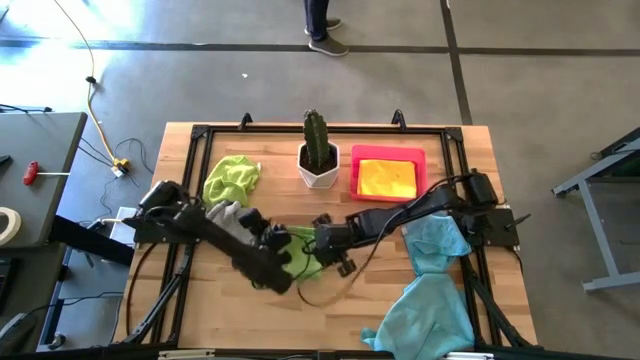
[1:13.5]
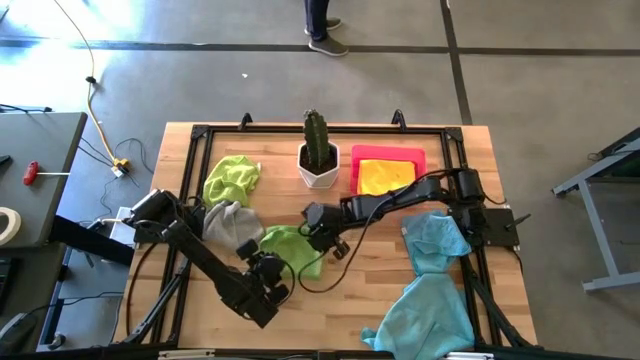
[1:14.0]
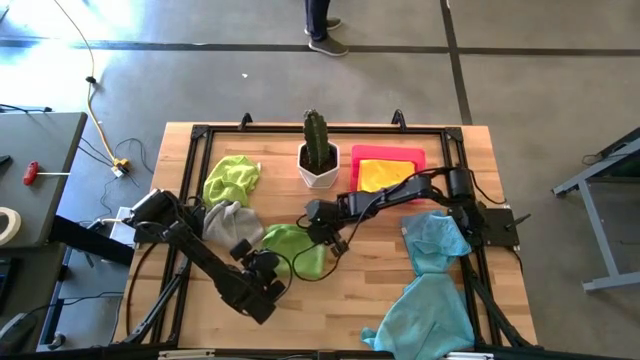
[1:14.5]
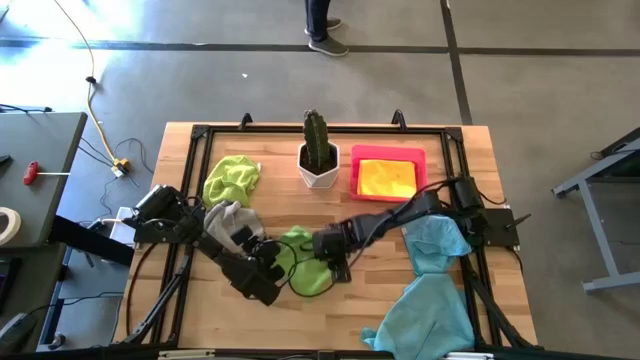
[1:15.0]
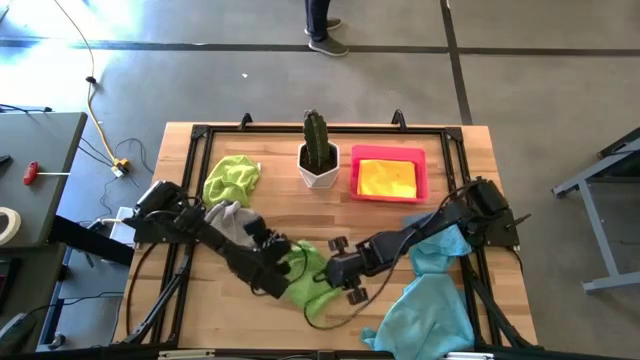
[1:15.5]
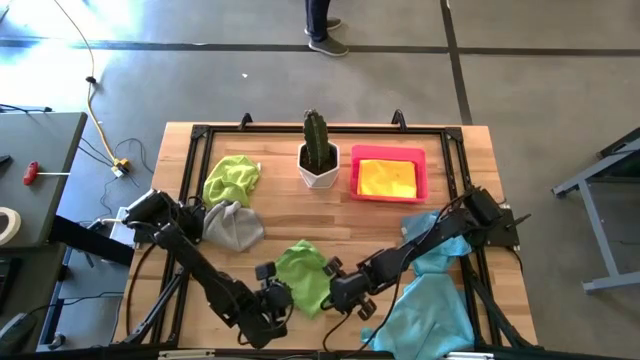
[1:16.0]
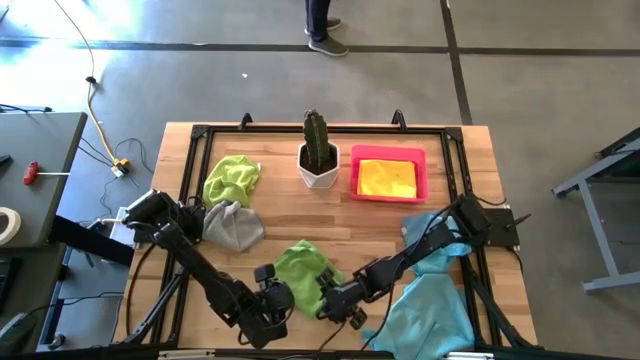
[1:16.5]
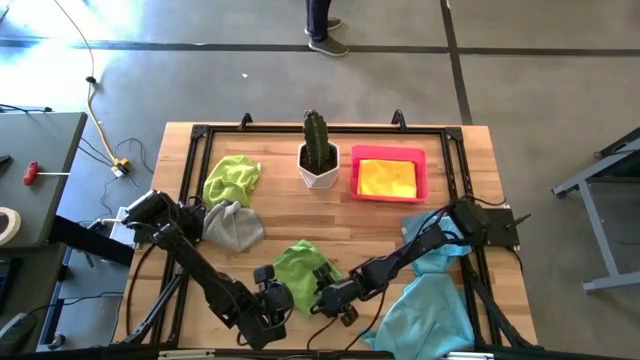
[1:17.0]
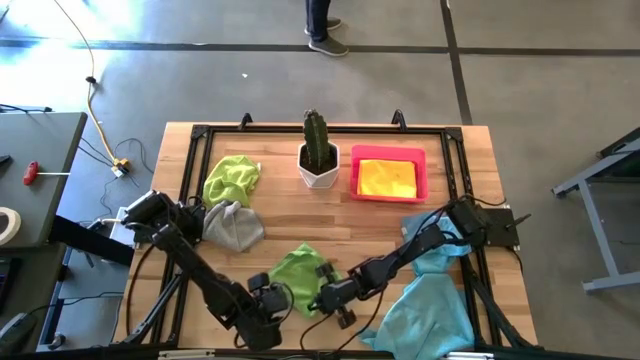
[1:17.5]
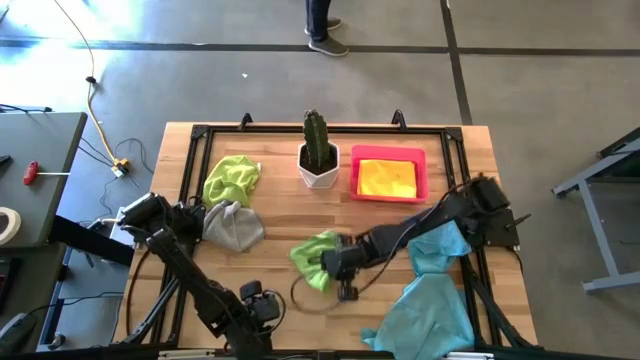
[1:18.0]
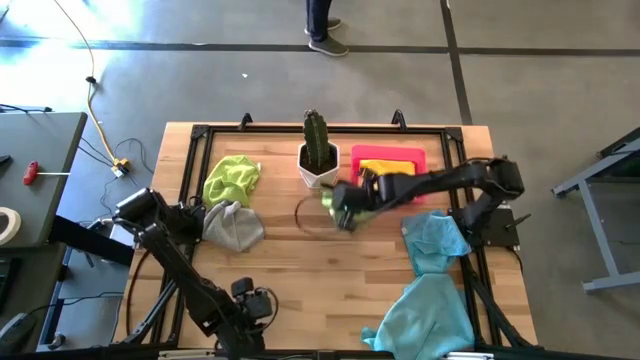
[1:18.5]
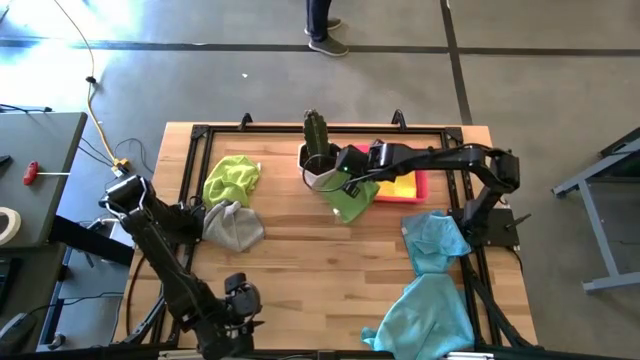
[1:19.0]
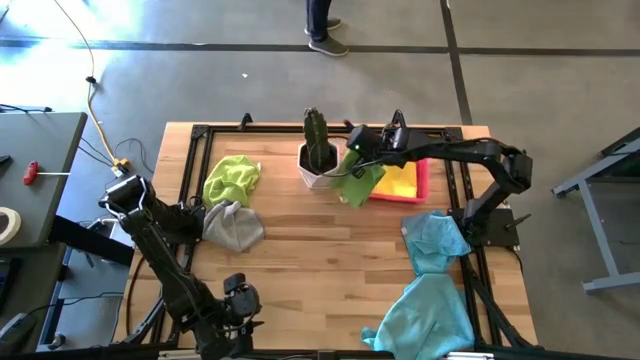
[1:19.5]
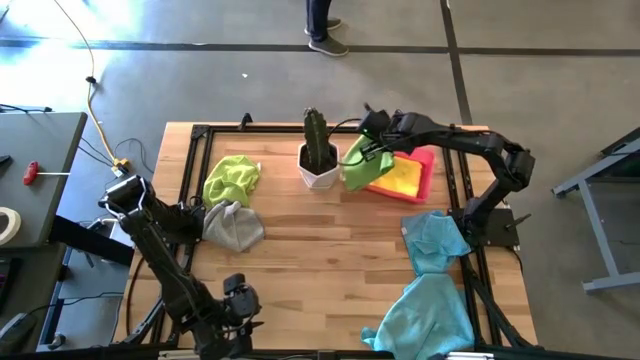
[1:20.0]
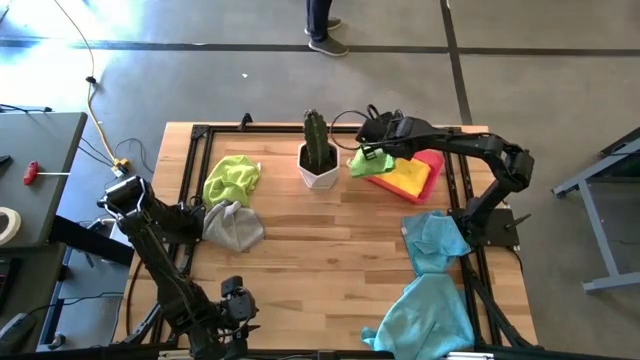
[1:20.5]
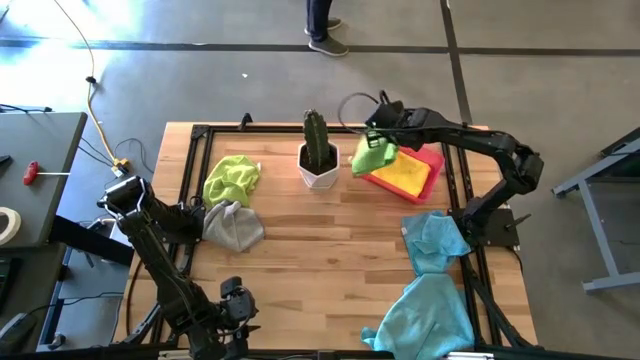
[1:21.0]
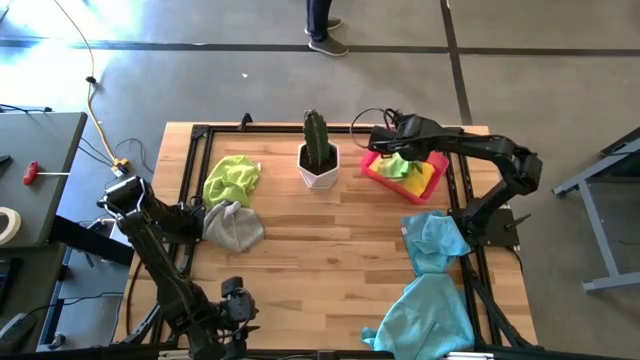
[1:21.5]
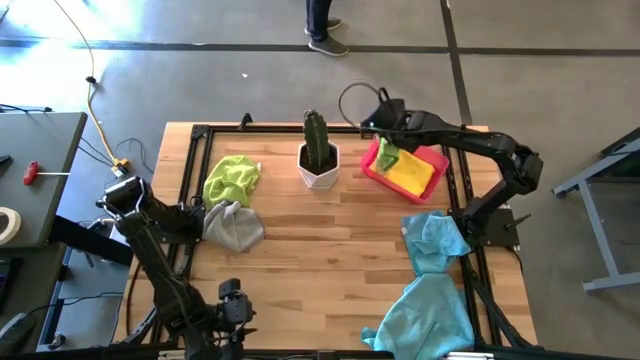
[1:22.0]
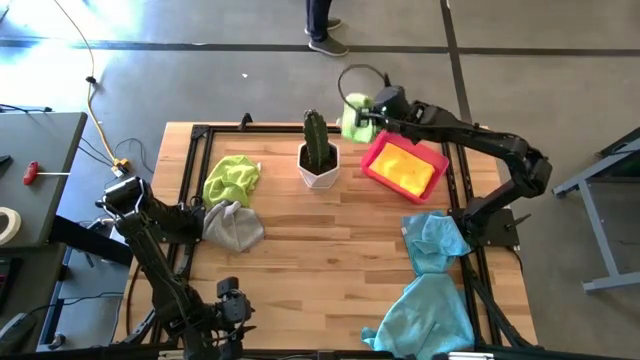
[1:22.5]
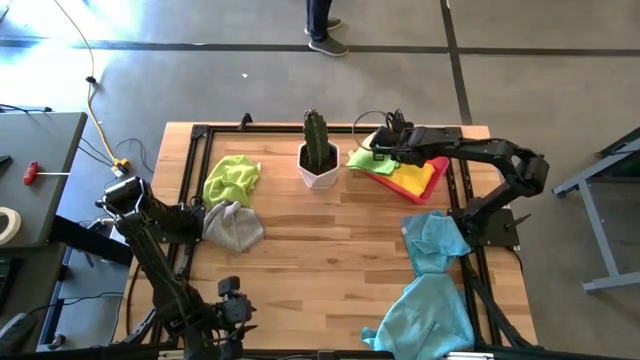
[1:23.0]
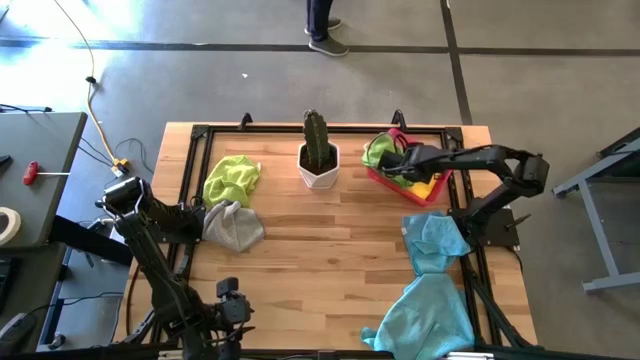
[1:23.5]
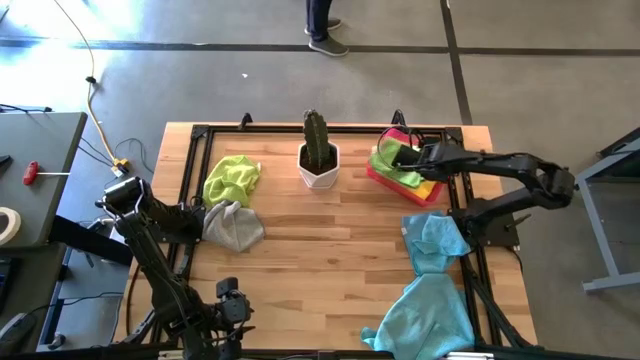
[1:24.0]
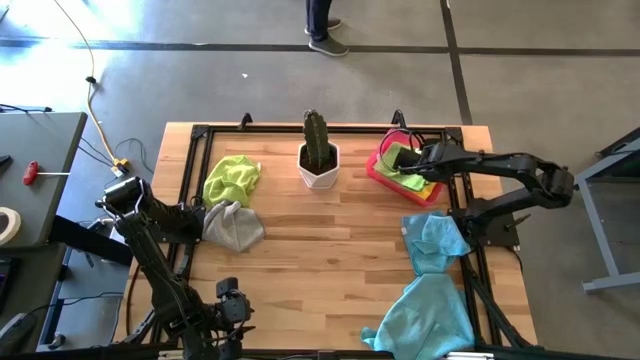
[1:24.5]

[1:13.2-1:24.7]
Task: Fold microfiber towels
Put the green microfiber towel into the red bin

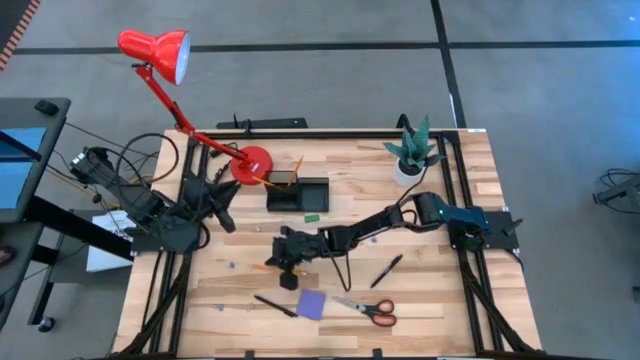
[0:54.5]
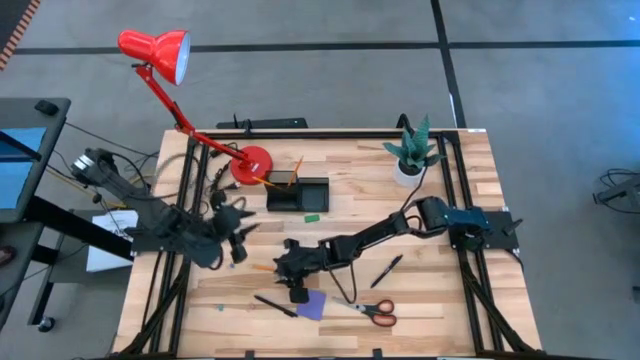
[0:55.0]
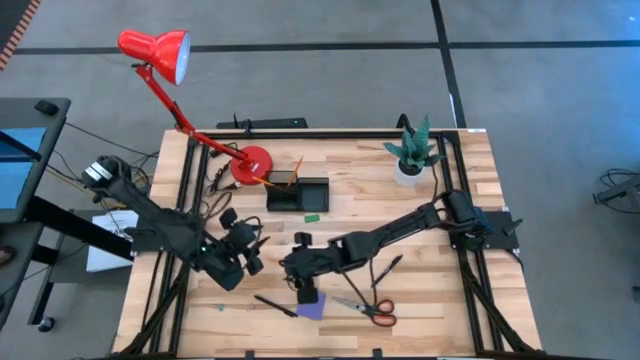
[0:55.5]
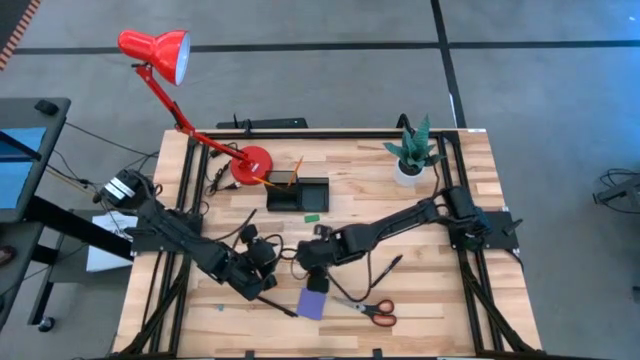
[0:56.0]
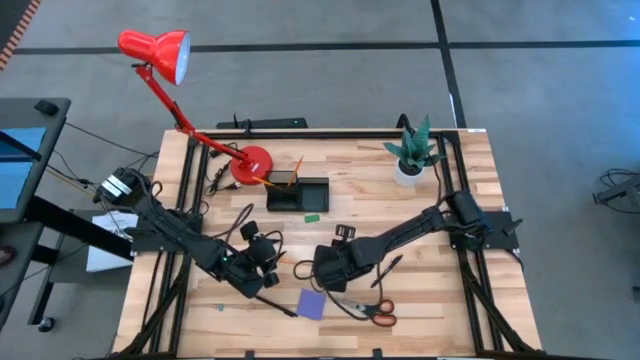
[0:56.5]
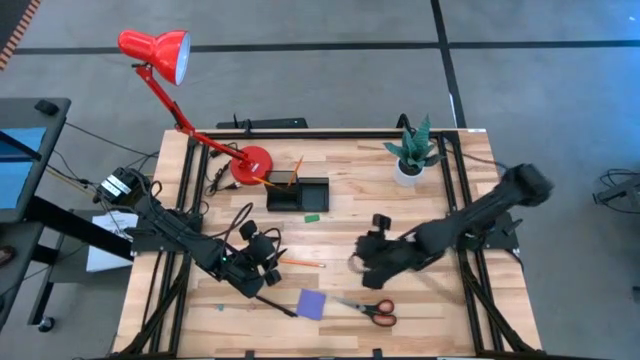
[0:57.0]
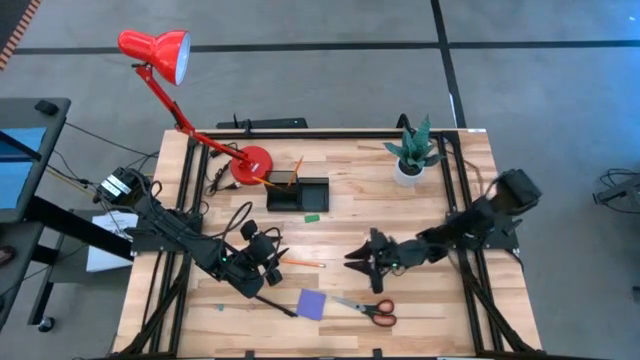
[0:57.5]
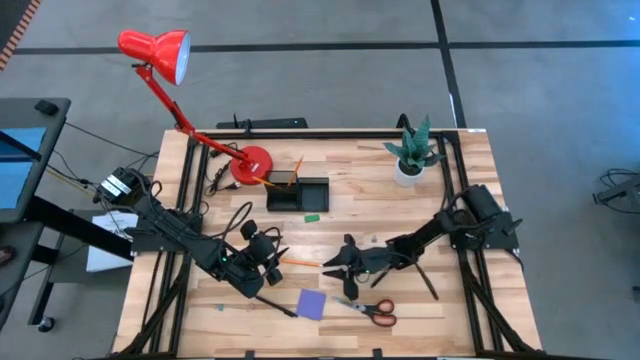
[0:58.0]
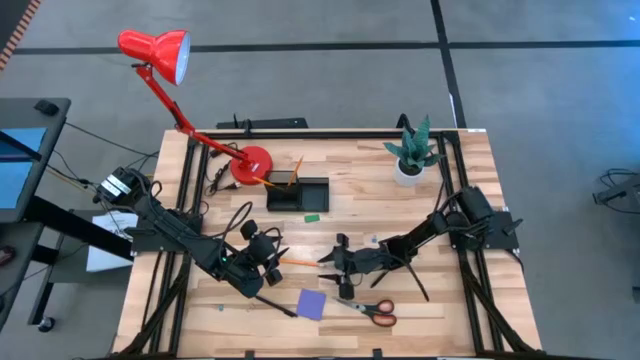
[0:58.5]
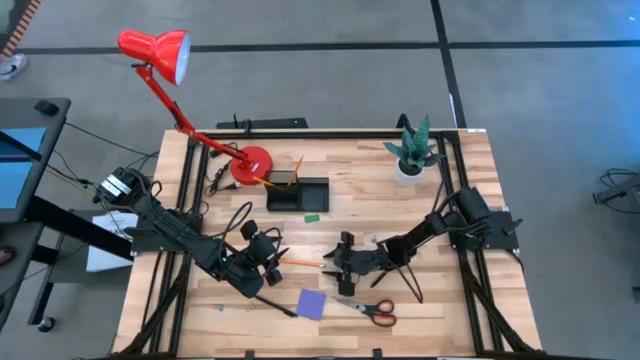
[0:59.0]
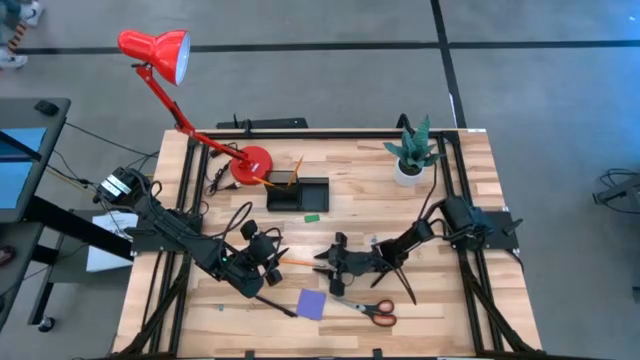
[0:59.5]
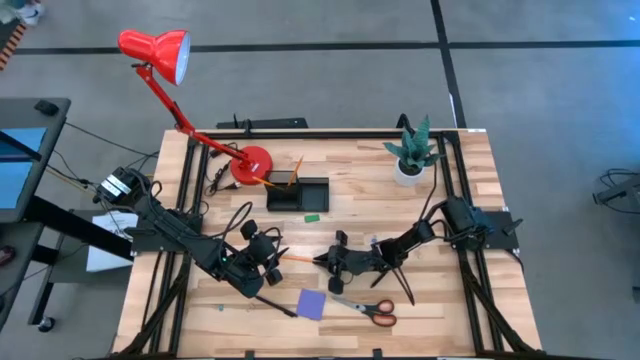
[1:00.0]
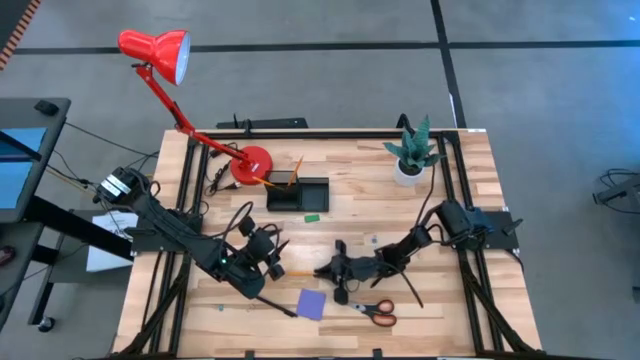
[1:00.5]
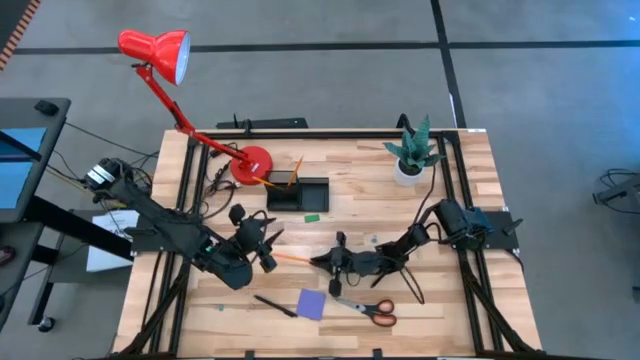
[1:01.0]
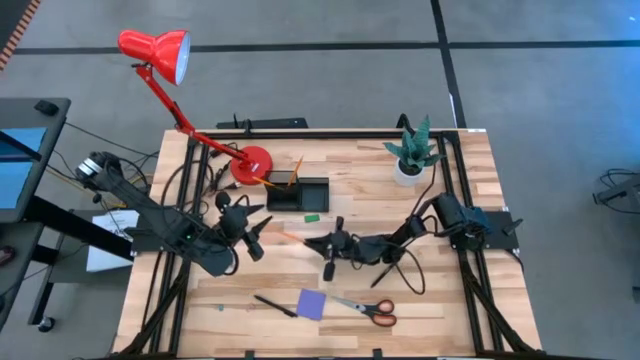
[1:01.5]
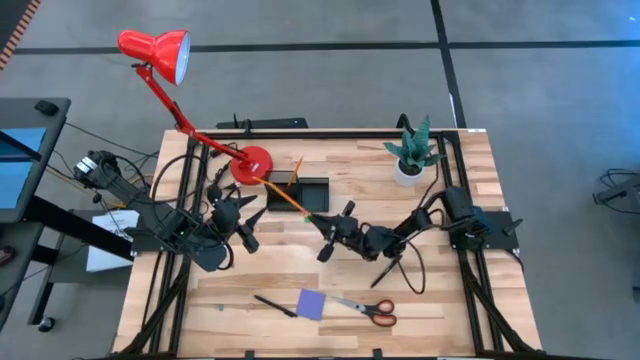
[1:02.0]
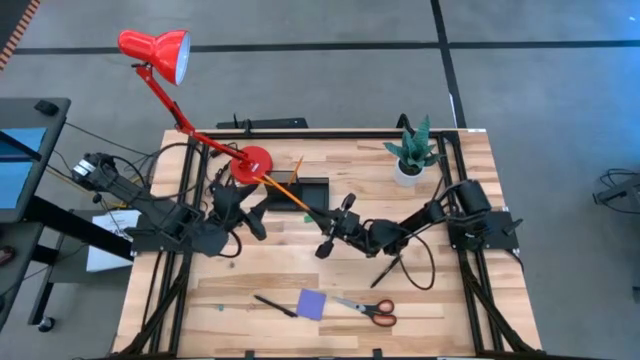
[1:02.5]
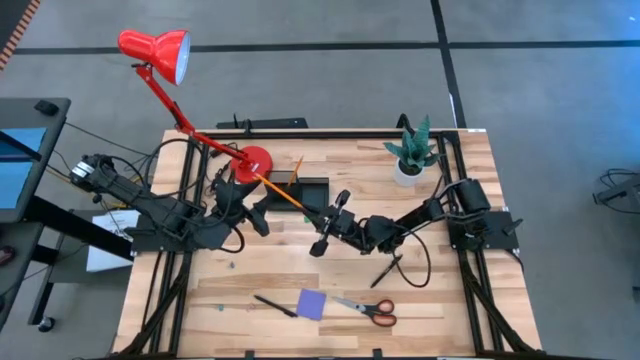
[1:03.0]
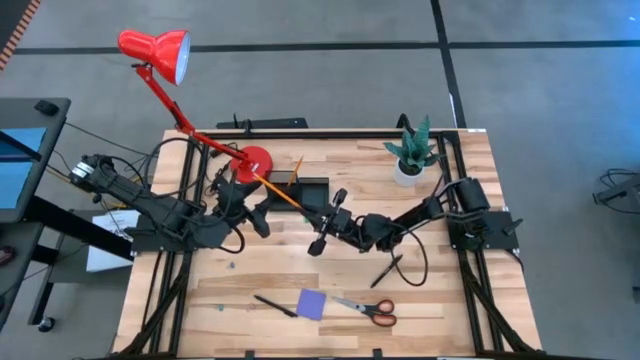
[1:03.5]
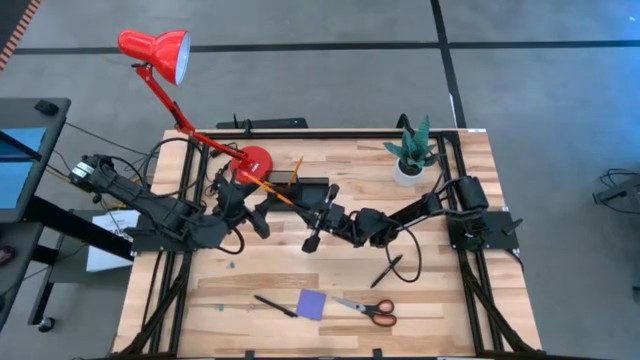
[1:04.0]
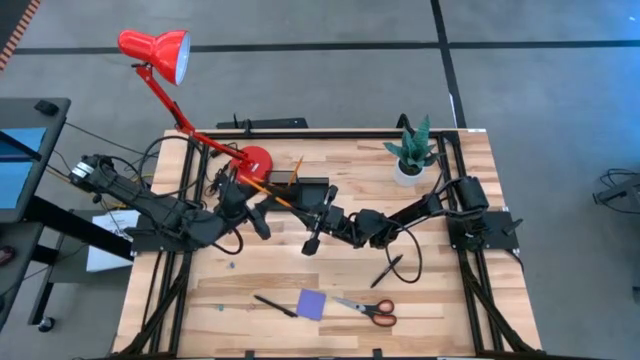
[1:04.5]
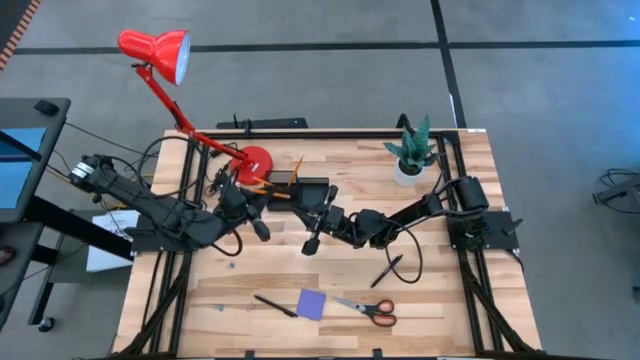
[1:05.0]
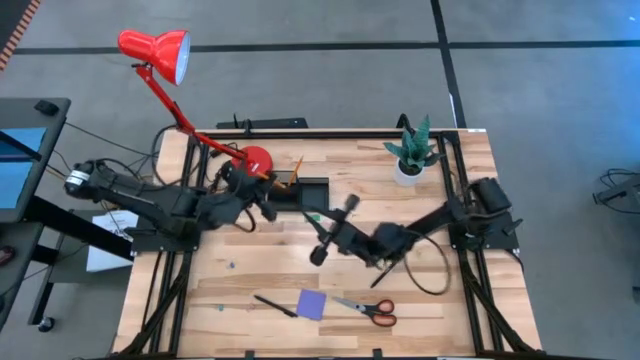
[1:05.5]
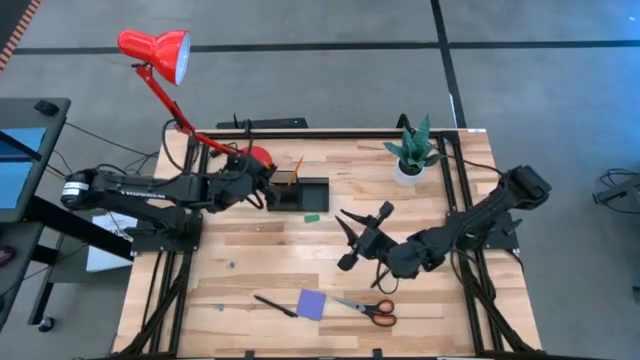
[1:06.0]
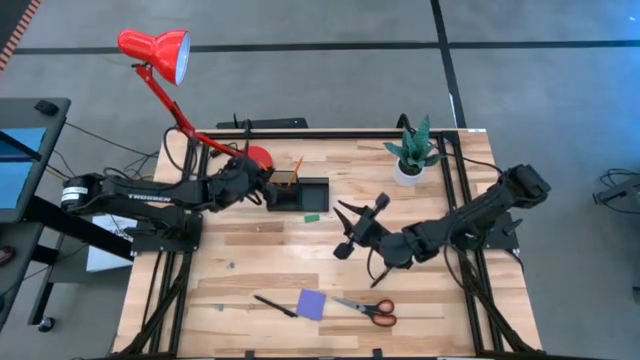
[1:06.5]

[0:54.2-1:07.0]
Task: Pick and place office supplies into organizer
Put the yellow pencil into the black desk organizer
